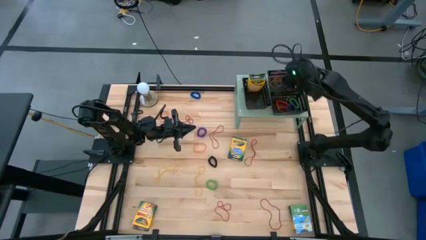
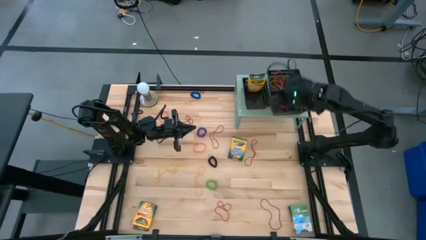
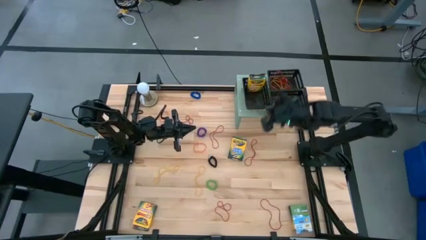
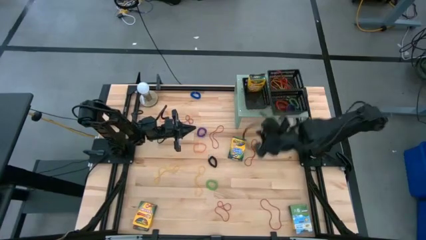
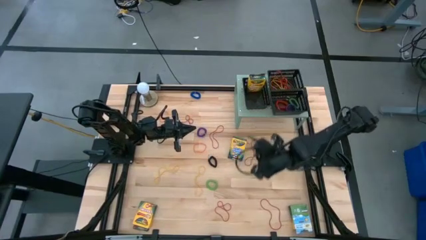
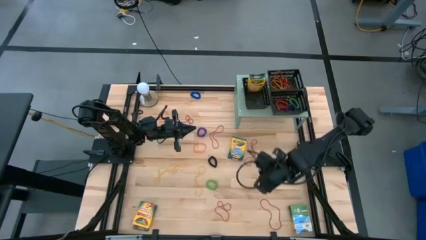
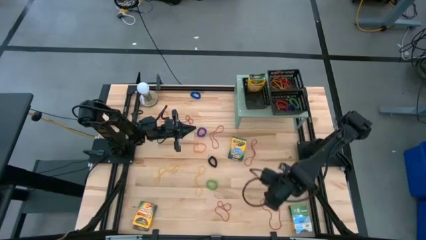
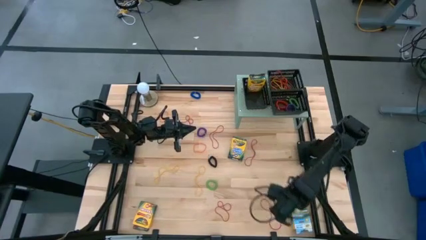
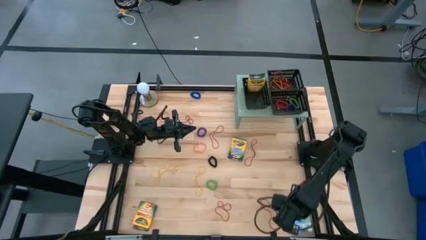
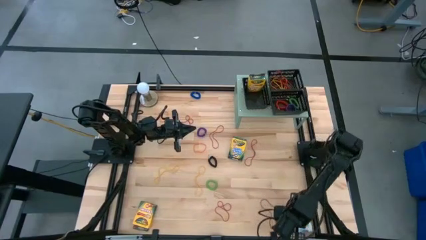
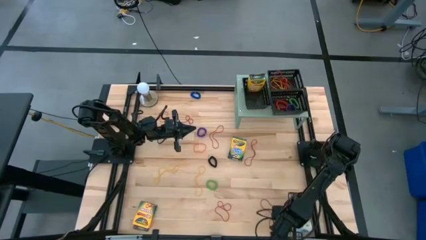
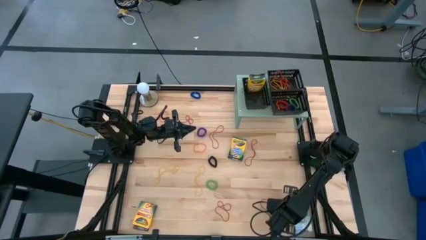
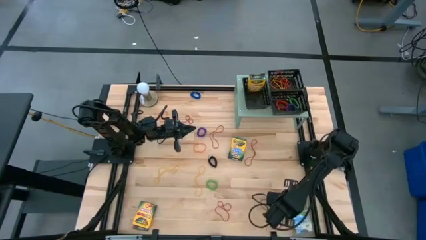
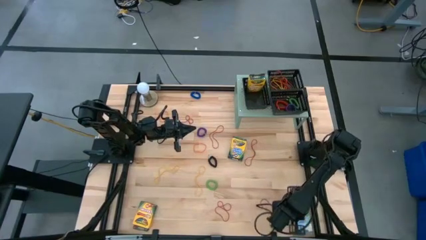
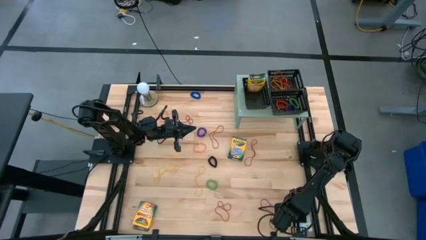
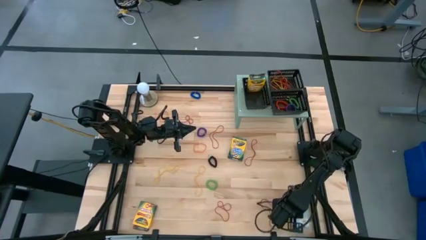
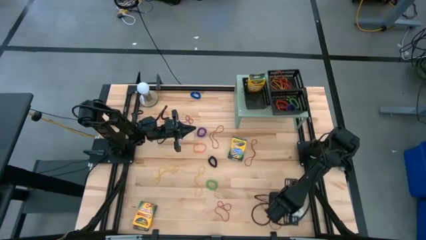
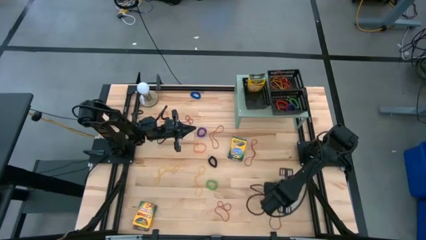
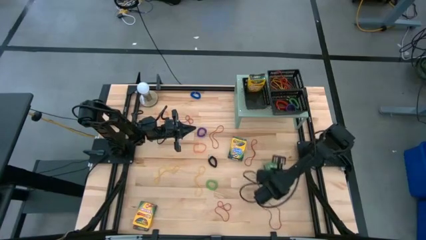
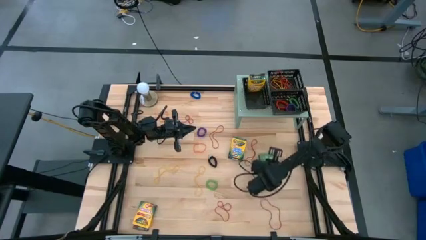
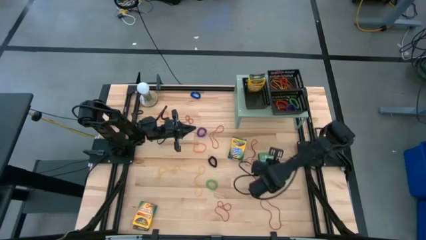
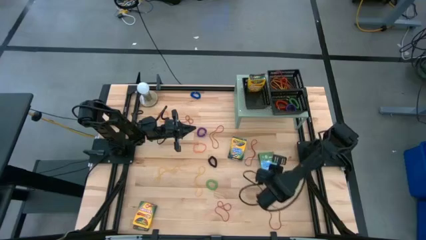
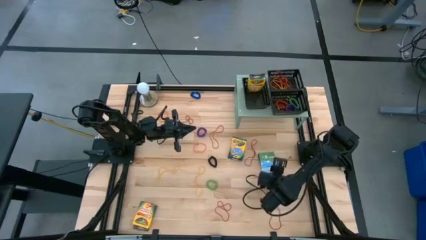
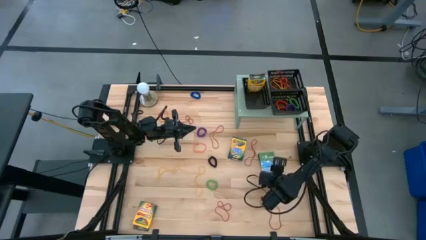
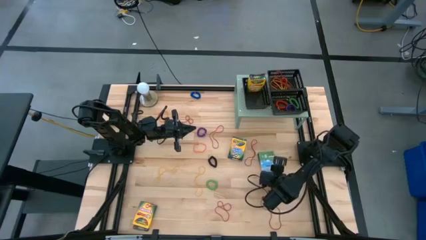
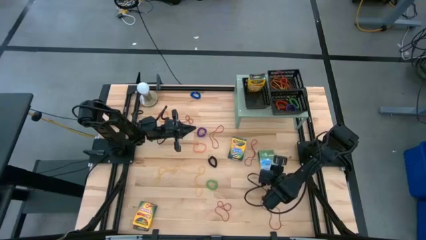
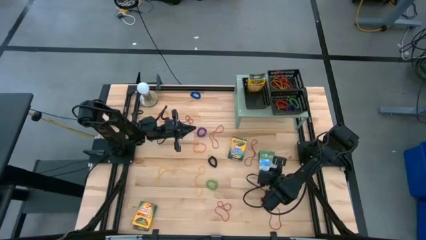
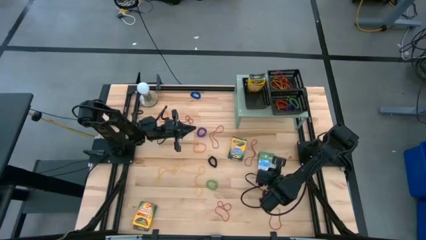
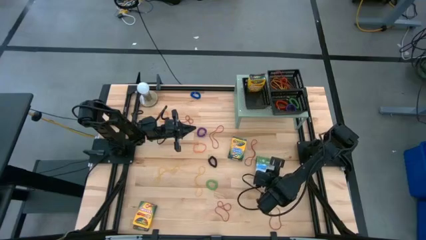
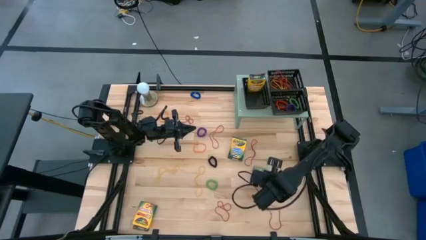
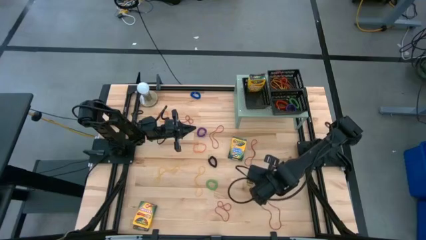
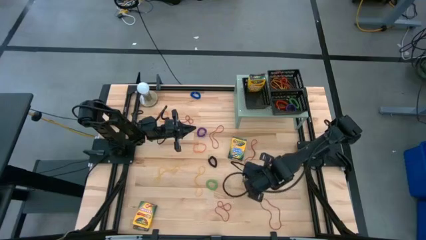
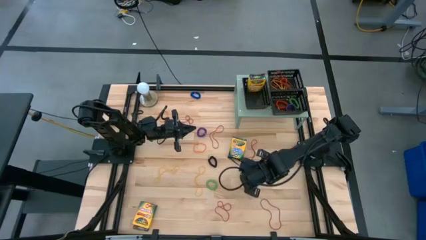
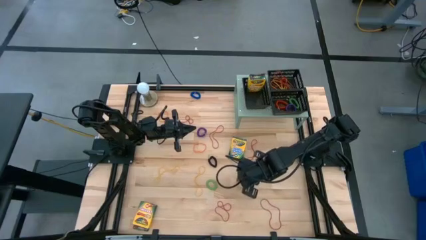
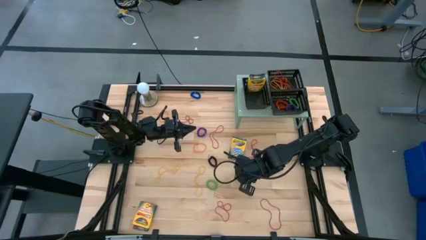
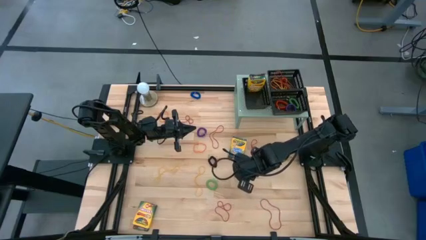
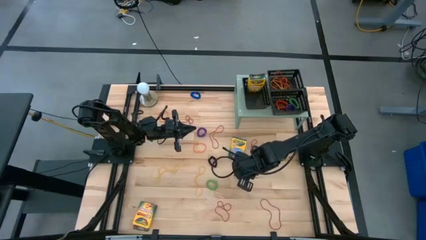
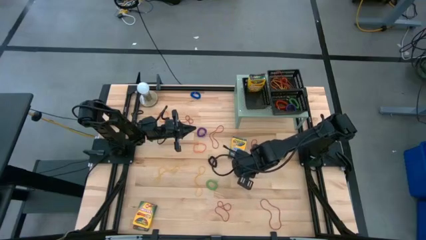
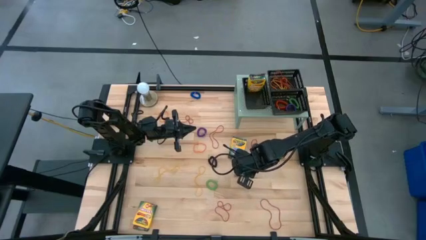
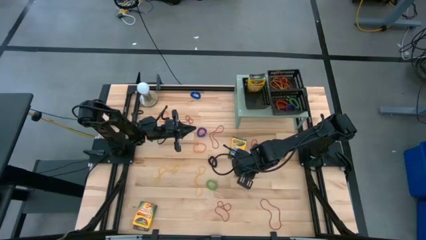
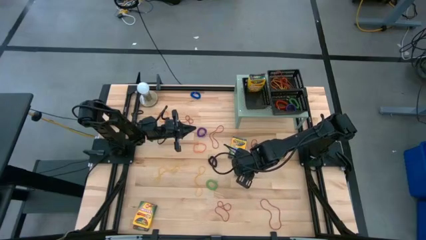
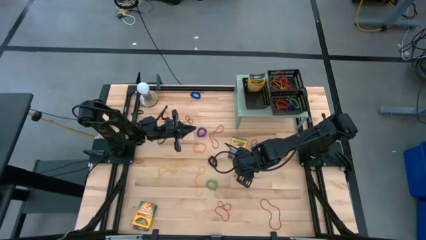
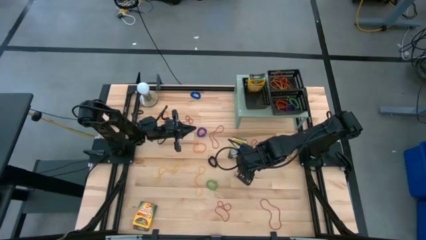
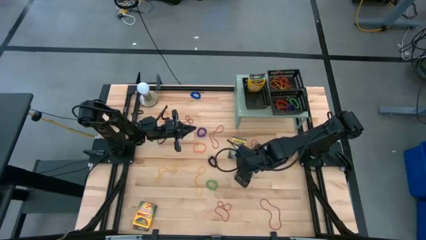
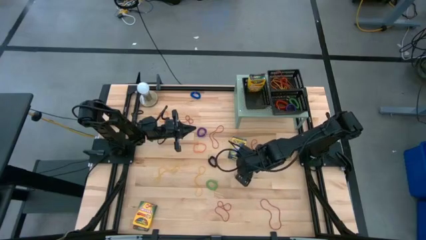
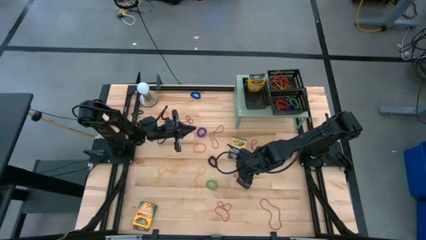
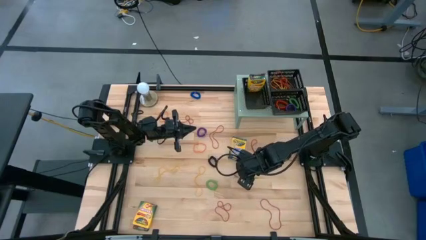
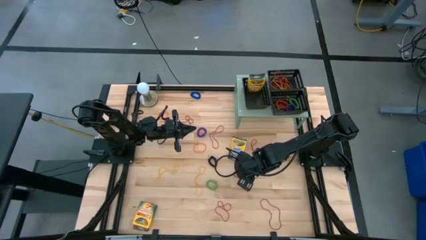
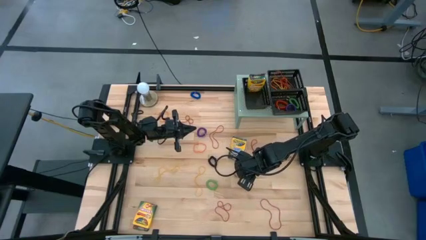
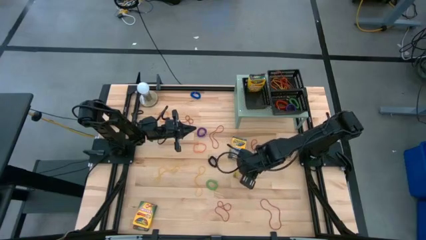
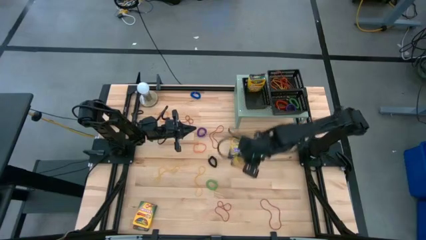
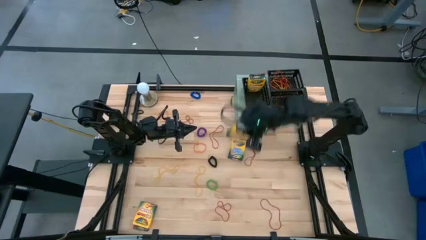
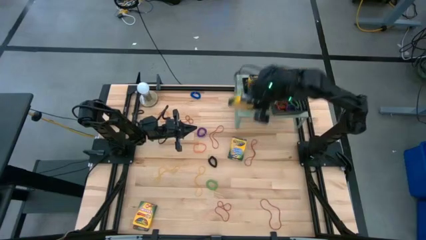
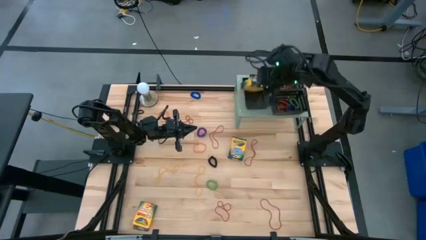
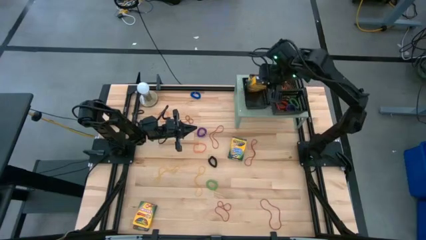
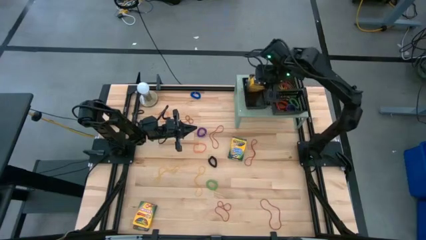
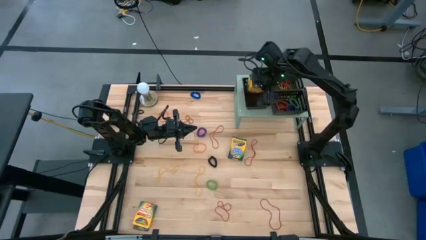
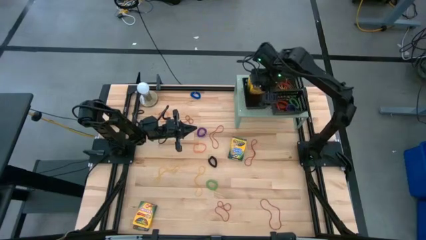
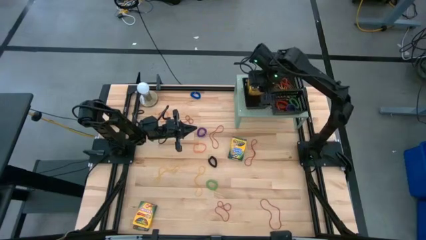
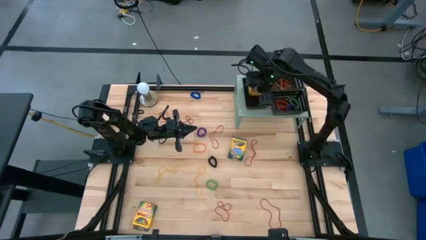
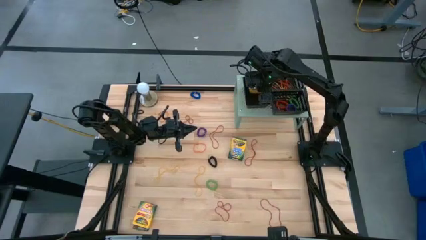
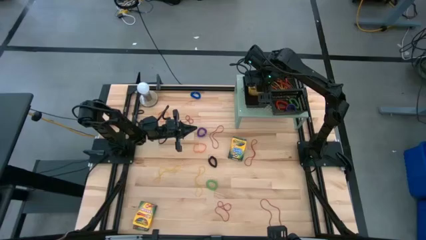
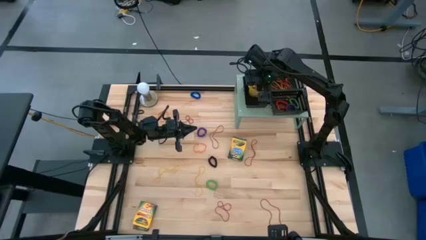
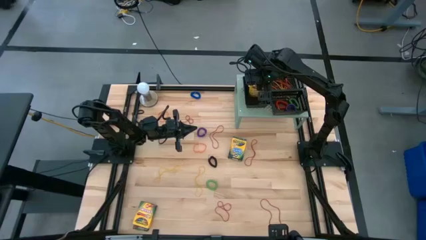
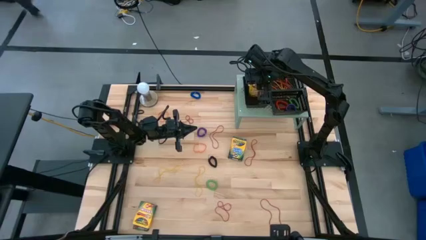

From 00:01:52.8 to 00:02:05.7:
Task: Pick & Place Office Desk Supplies
Put the right yellow crayon box into the left black bin on the shelf

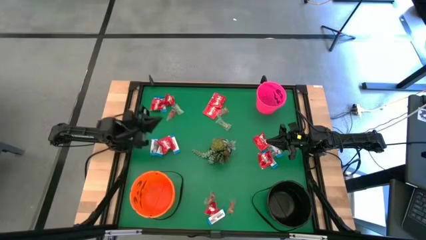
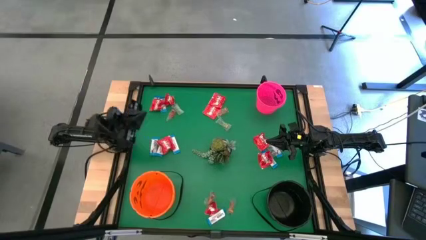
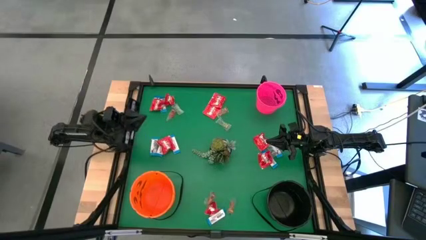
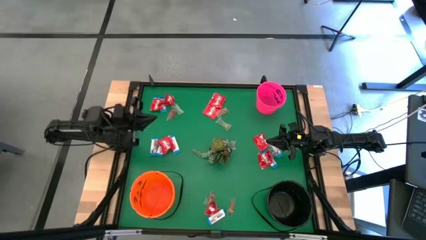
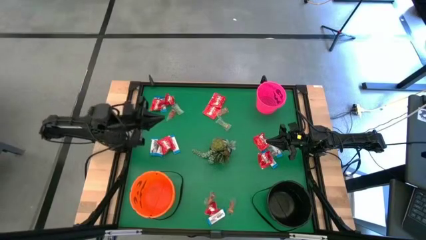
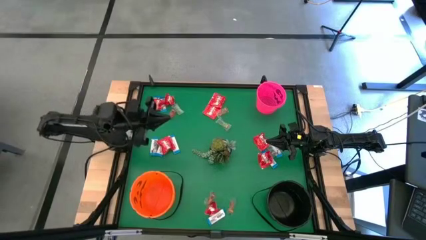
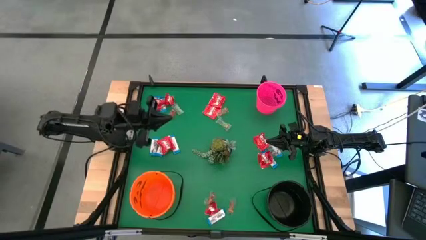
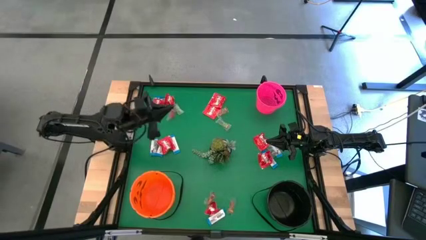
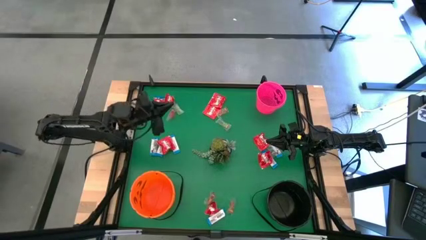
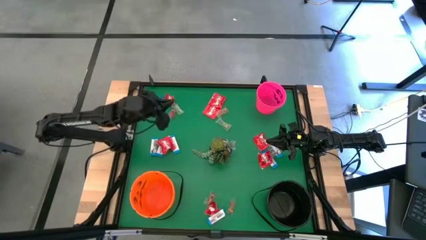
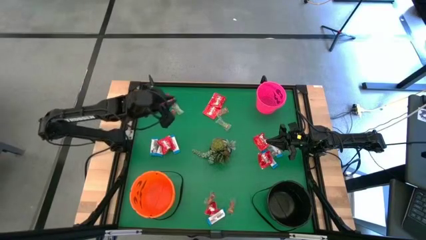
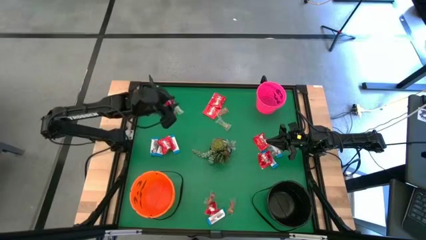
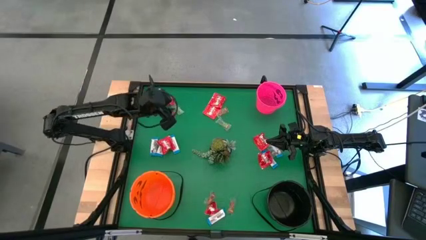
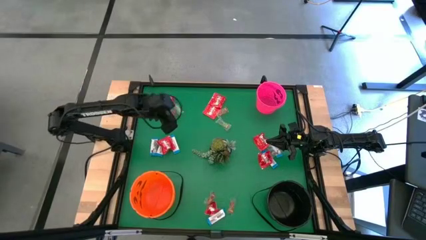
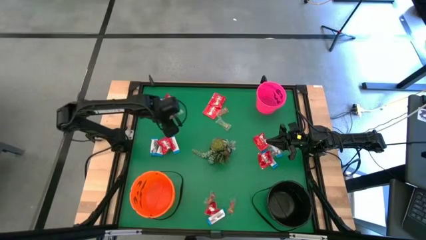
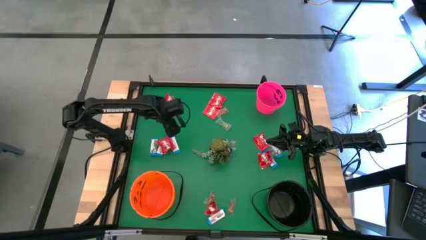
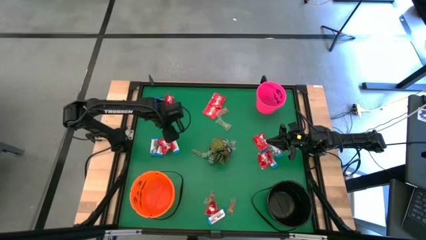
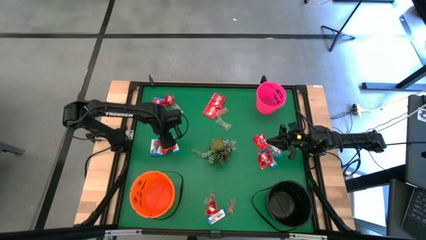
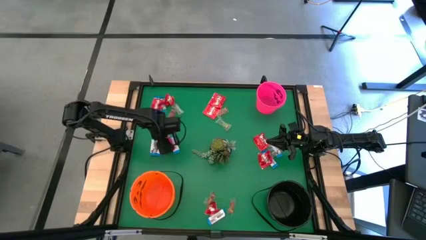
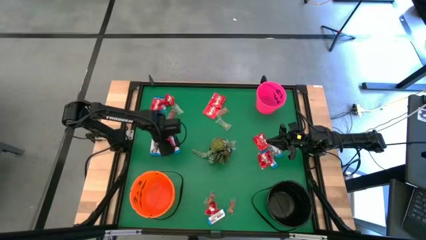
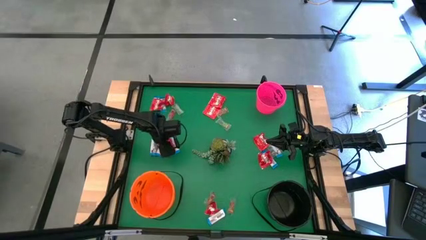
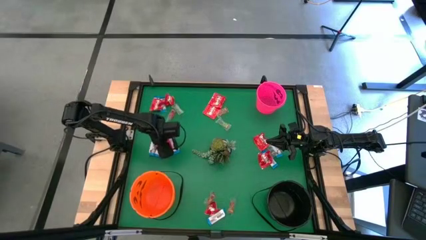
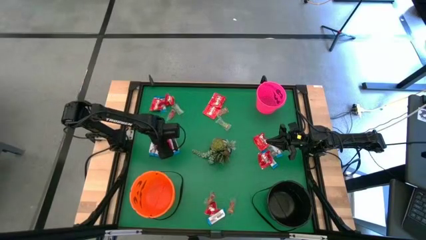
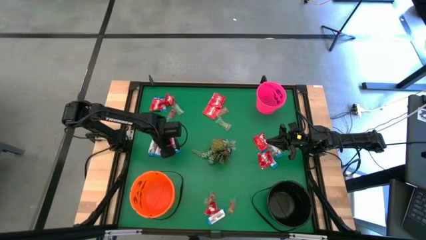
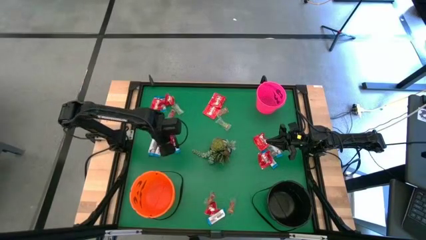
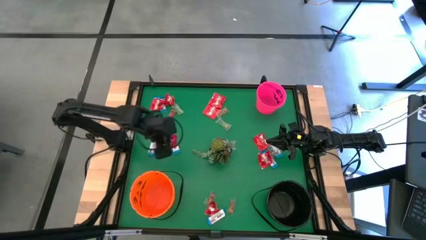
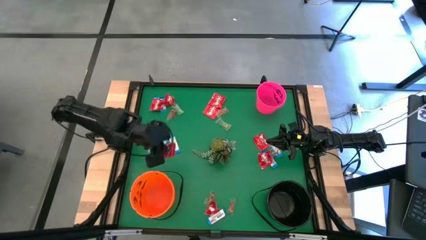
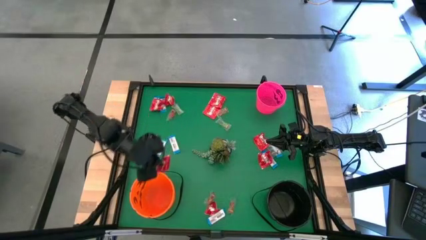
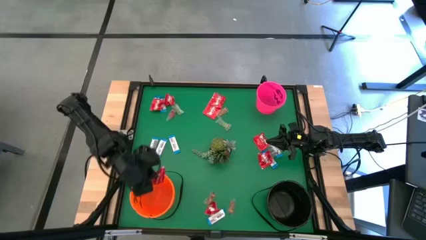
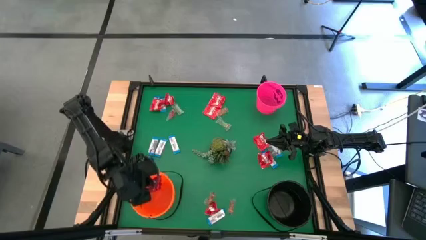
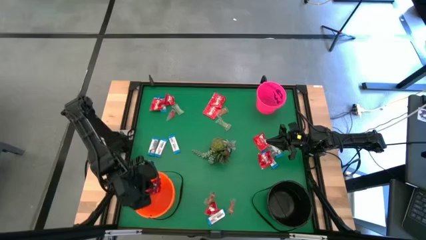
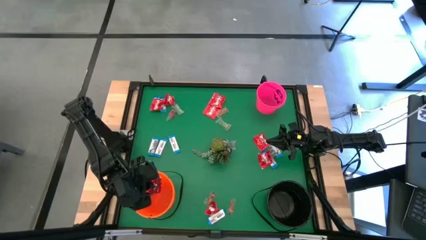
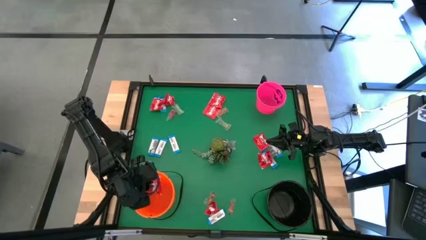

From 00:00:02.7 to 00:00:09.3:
Task: Sort candy
Put the red candy into the orange bucket
